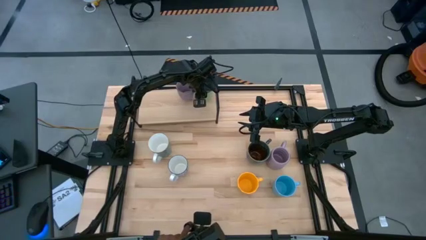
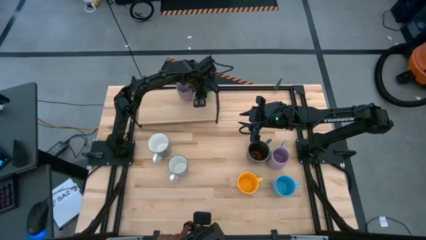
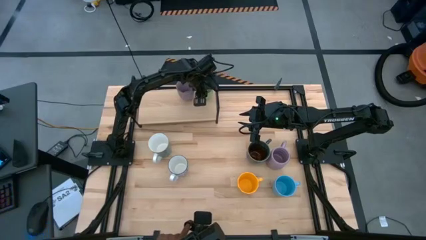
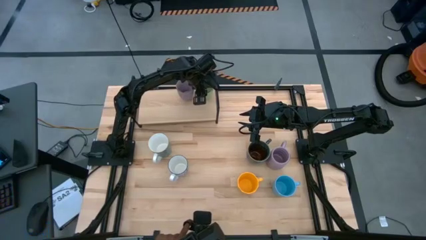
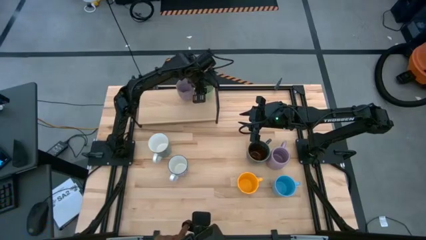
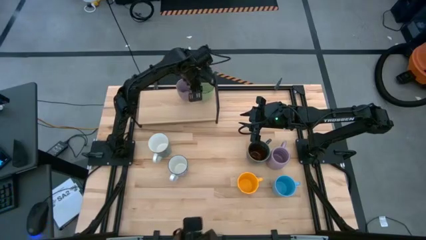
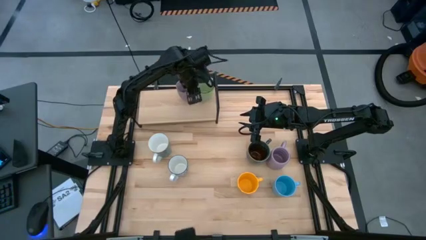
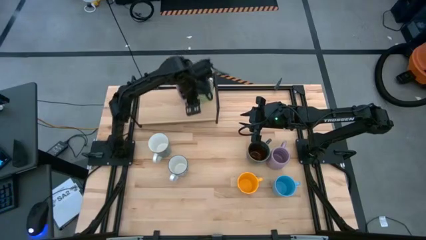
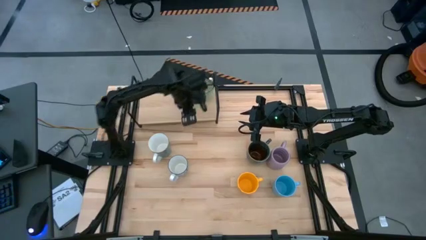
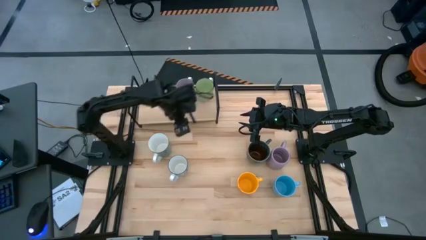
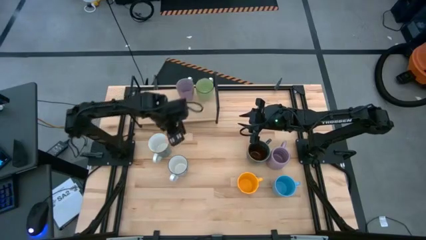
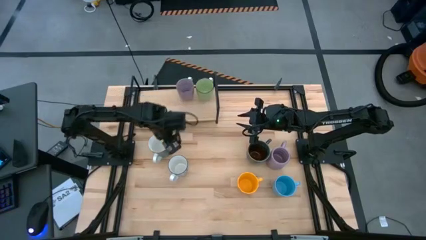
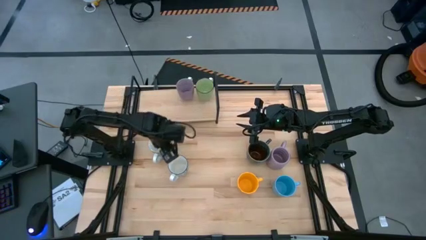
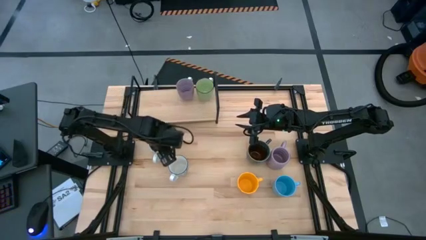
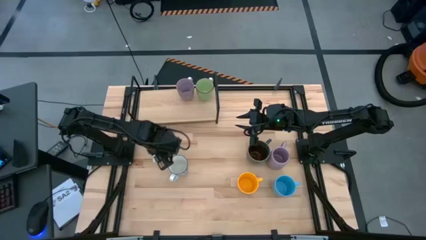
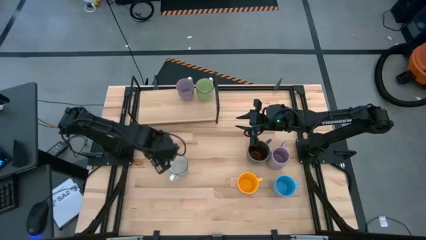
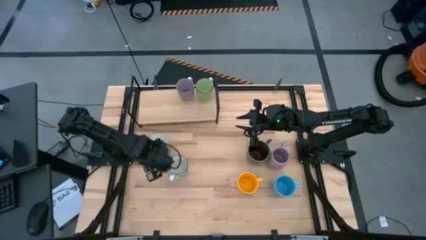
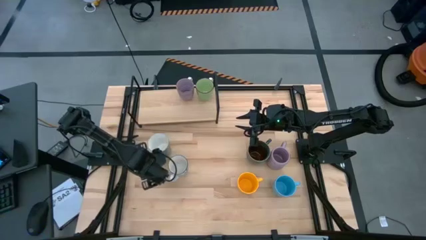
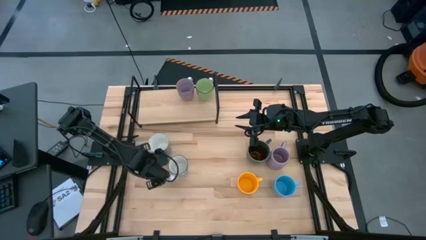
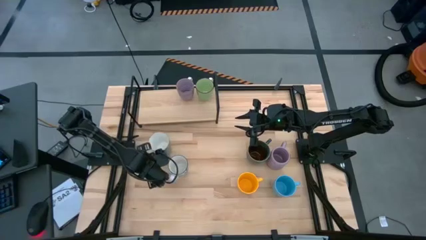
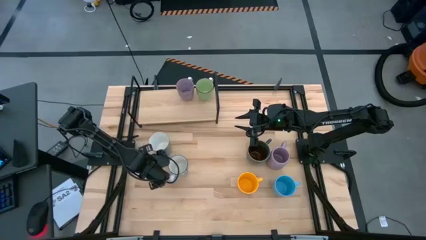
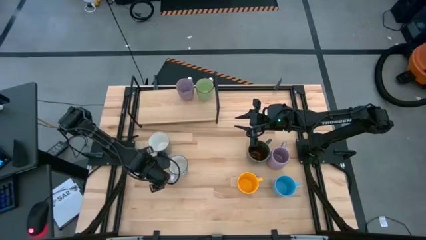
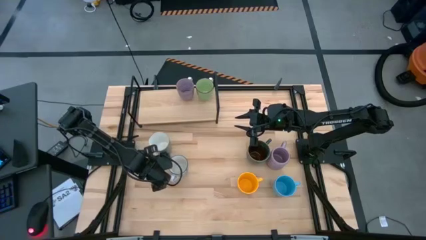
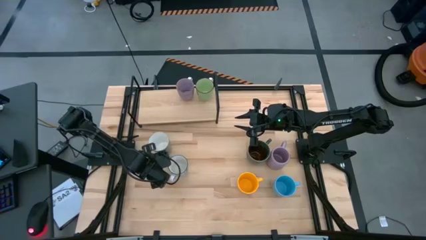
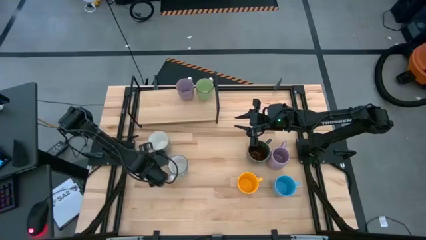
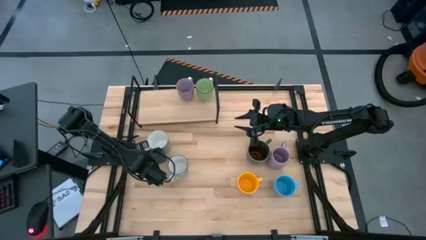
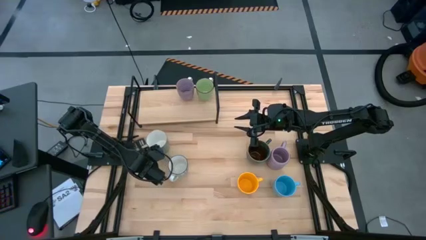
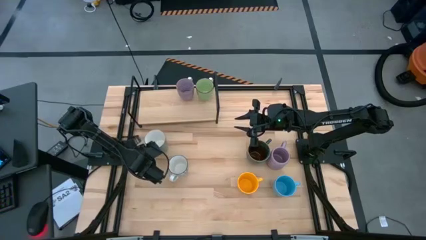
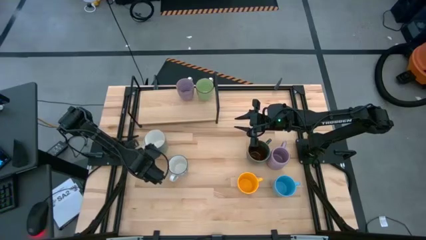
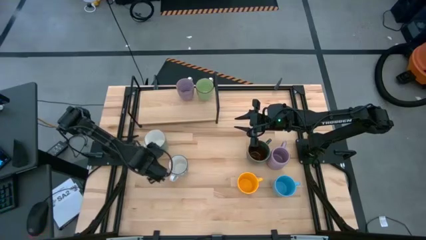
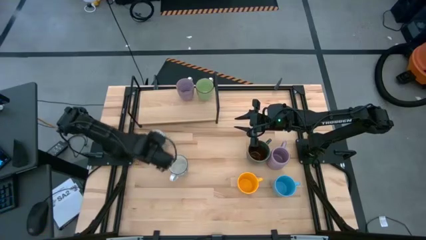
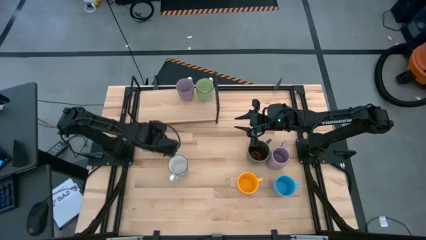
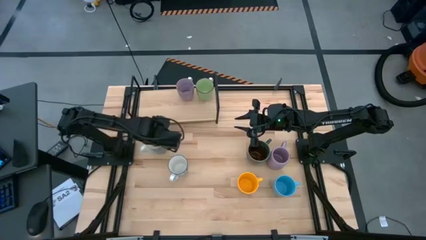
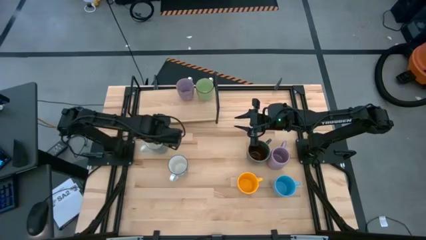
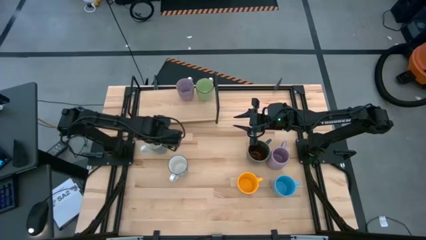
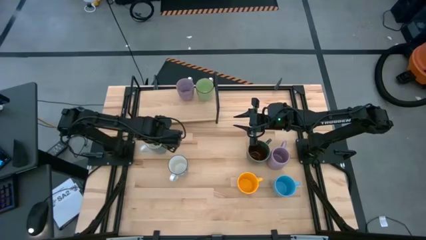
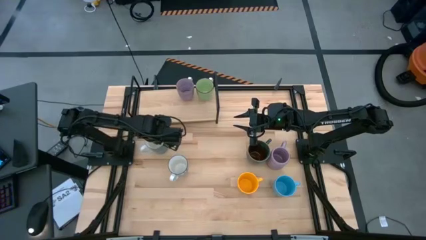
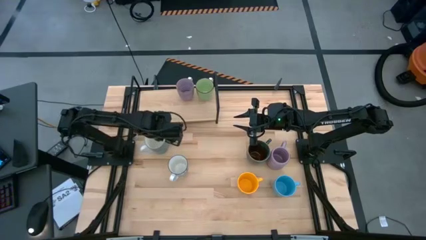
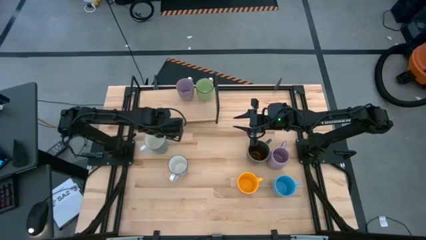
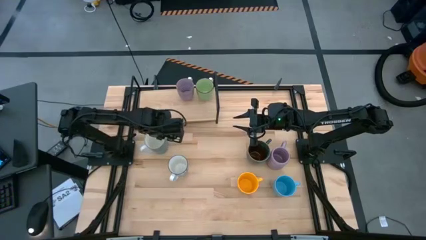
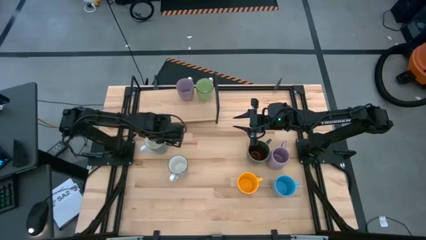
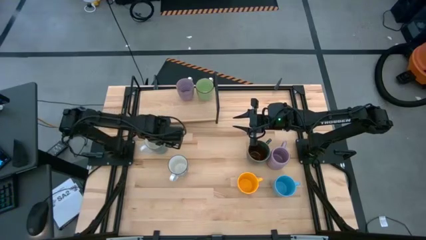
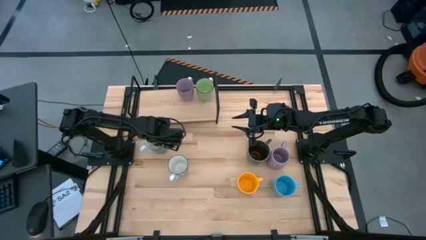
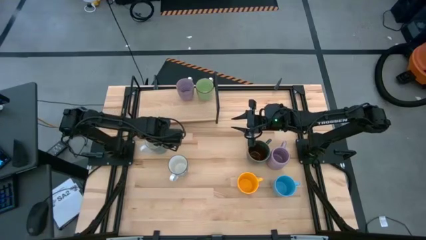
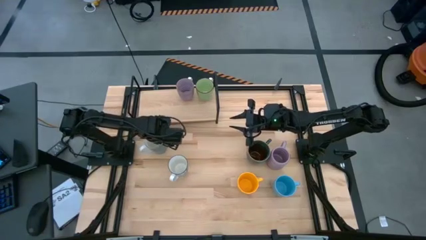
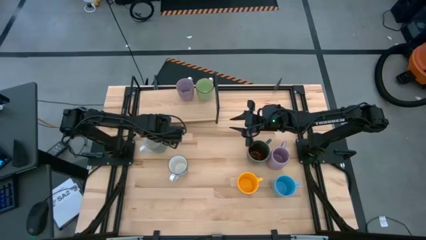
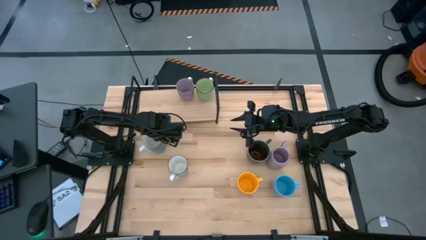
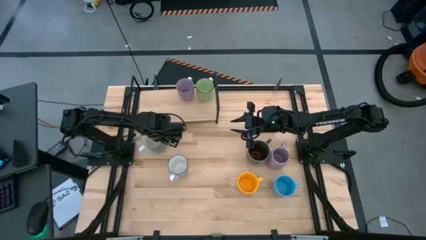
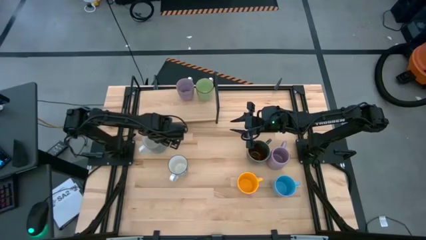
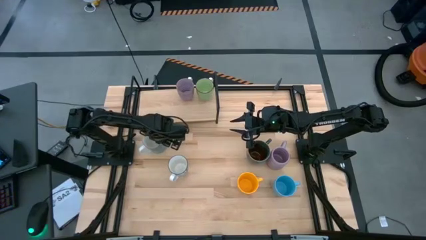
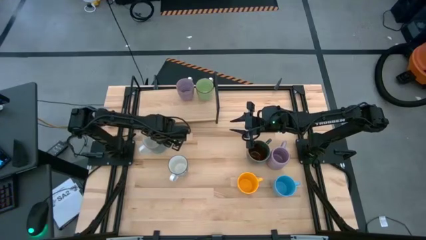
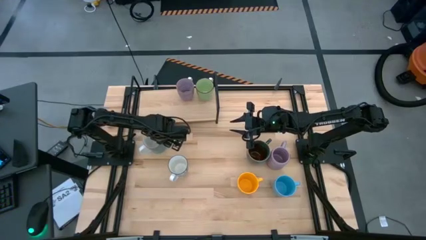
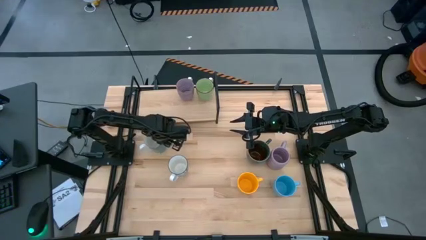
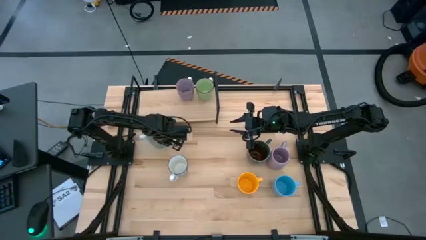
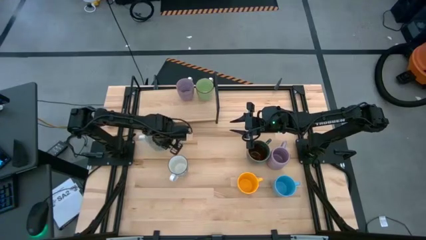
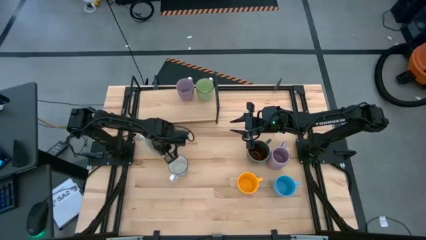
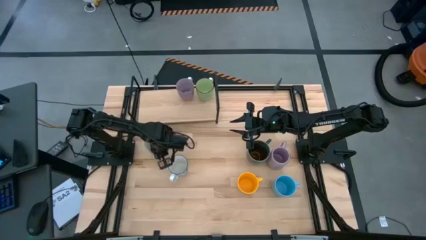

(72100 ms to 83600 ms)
Task: Place coffee mugs
Put the light blue mug on the shelf

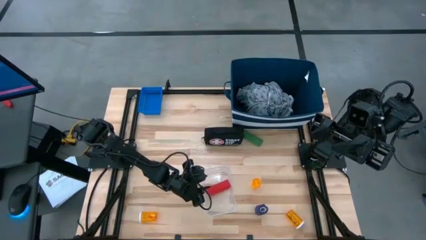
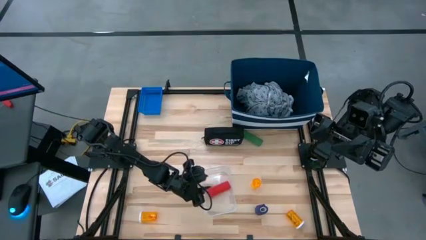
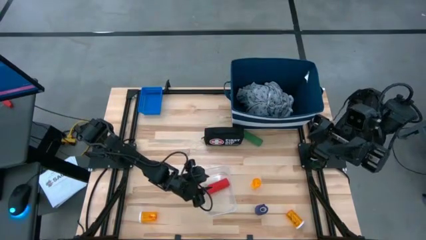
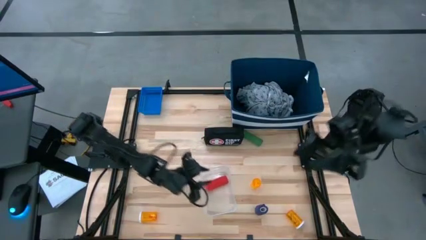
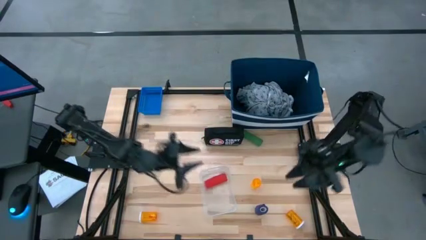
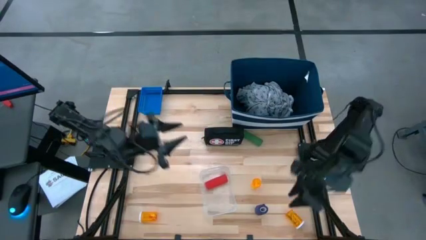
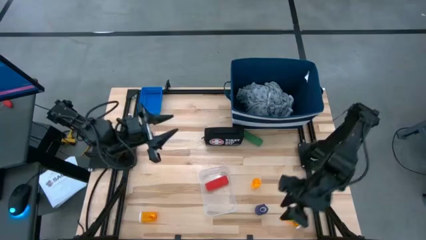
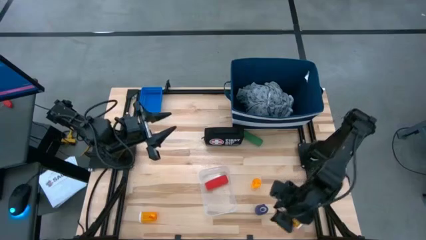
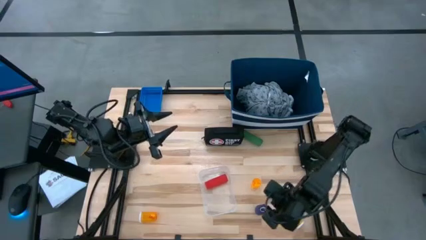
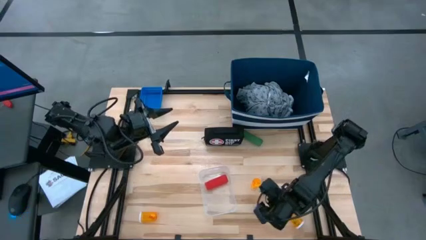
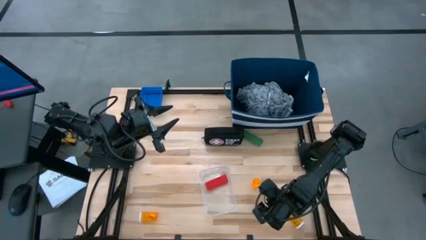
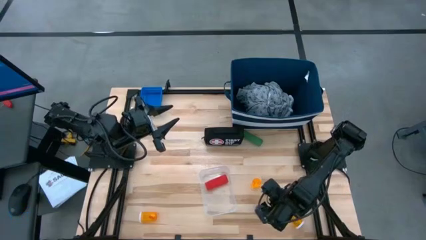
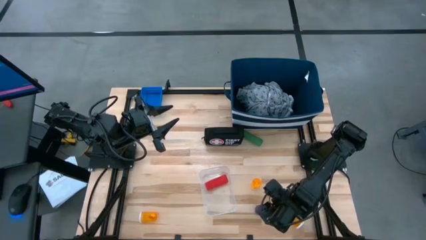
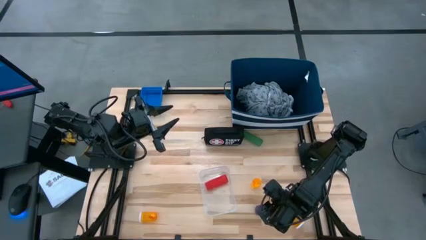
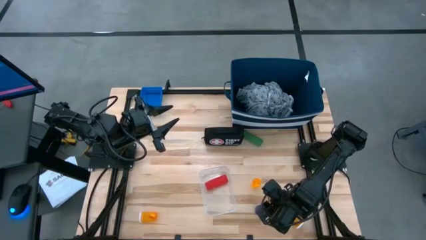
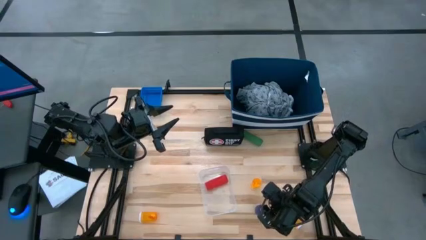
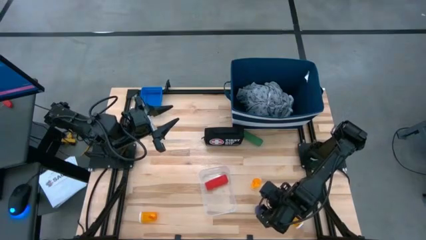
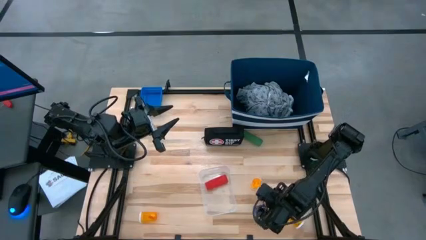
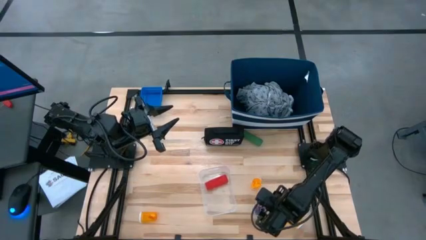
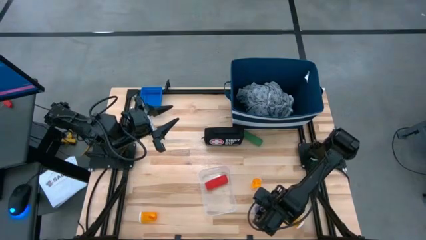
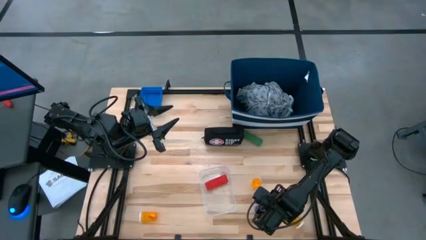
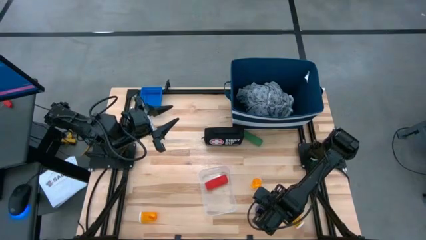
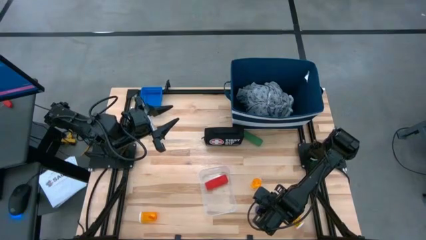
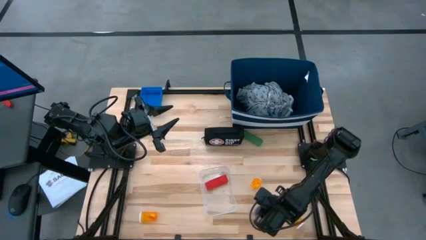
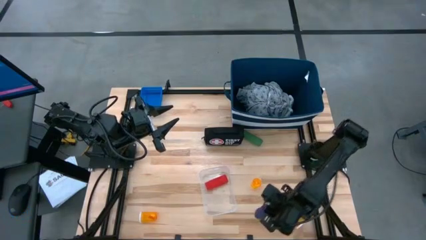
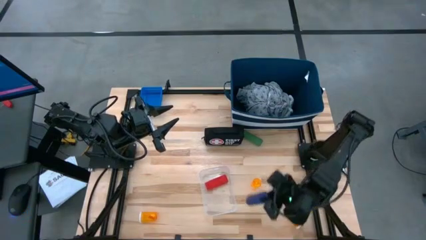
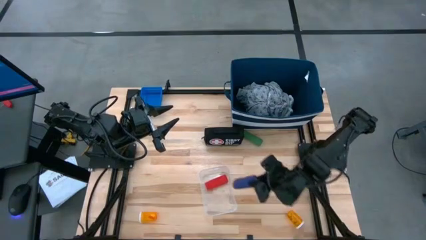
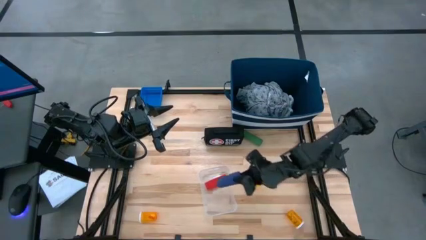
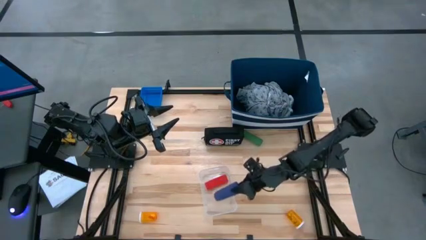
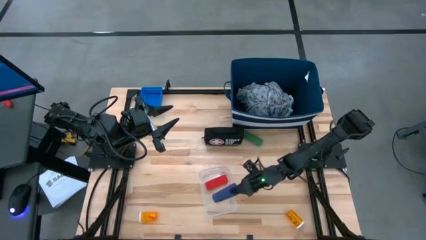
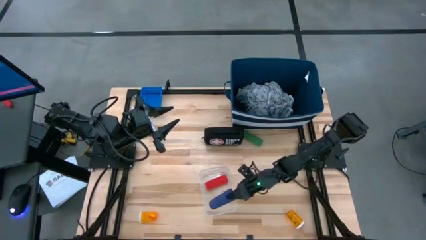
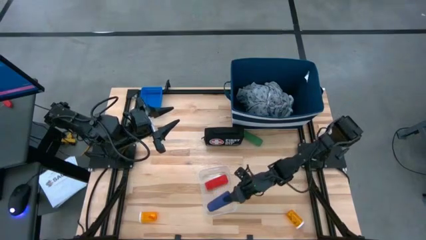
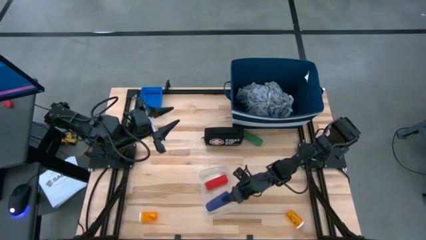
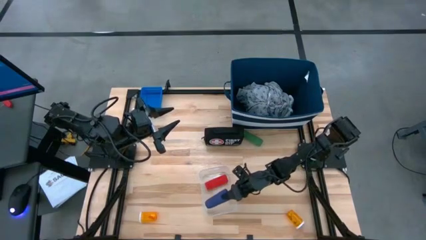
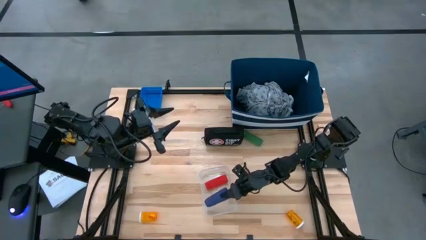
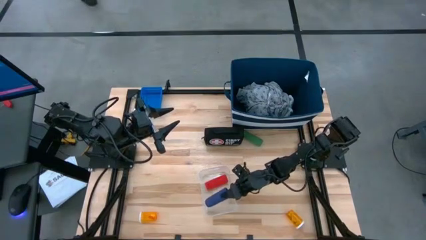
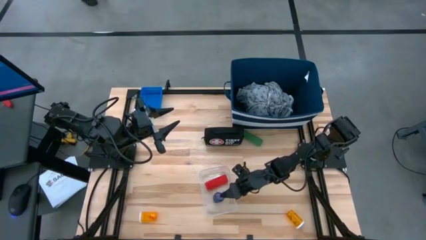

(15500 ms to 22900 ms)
Task: Pick & place medical supplies in basket/bin
Put the blue bandage into the transparent bin
